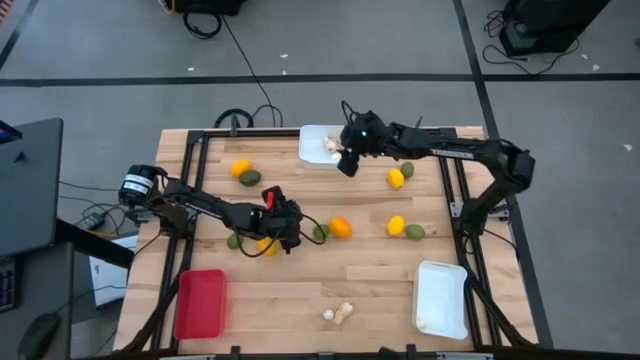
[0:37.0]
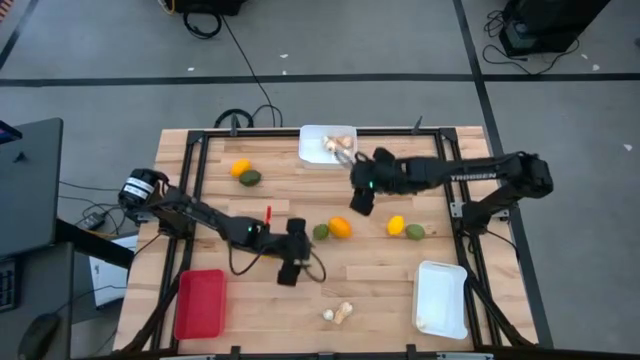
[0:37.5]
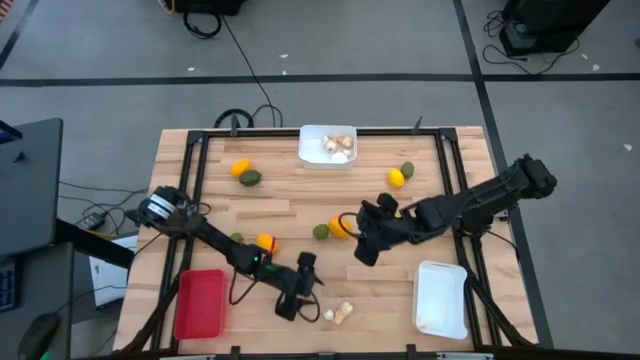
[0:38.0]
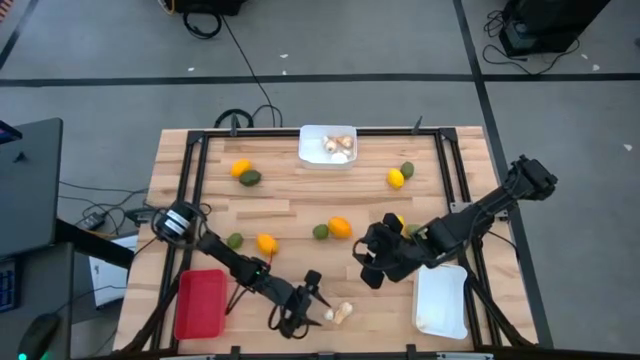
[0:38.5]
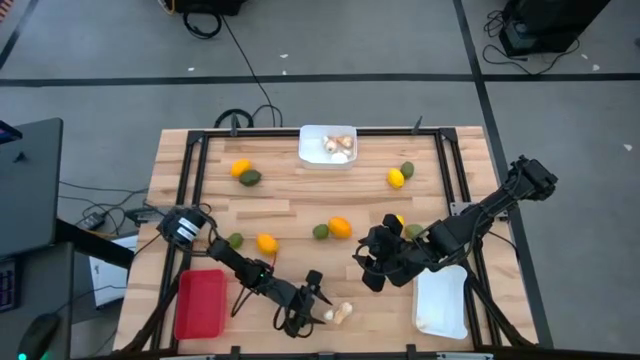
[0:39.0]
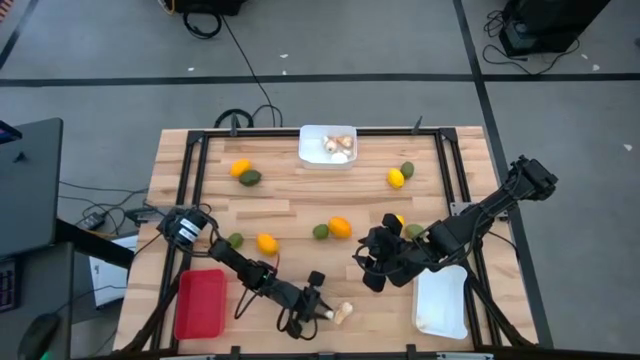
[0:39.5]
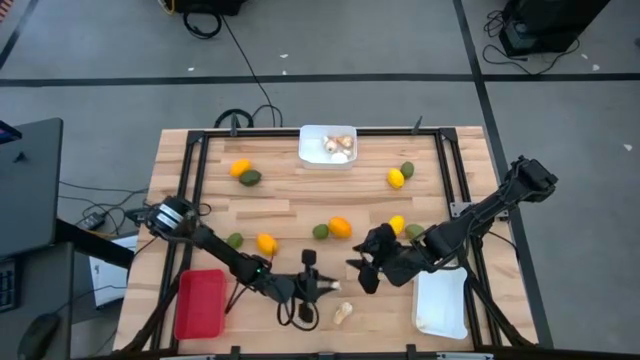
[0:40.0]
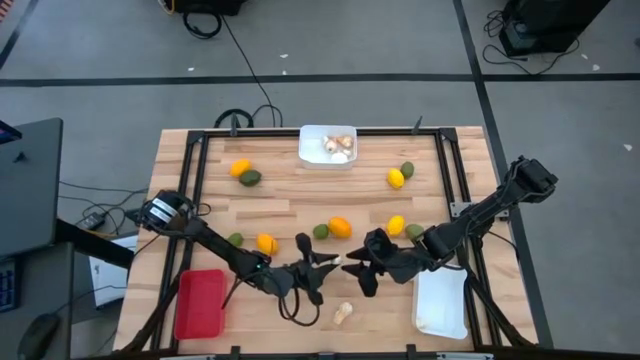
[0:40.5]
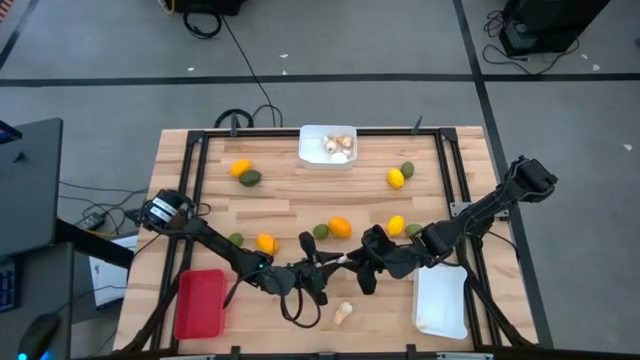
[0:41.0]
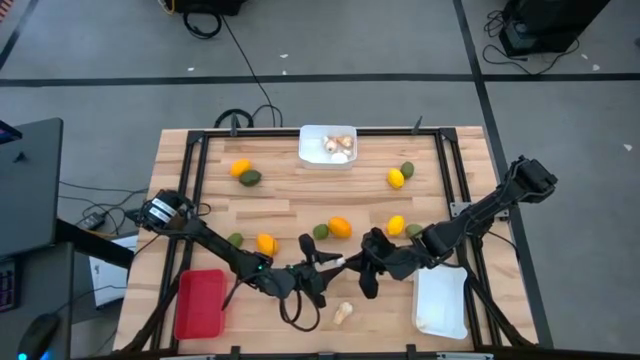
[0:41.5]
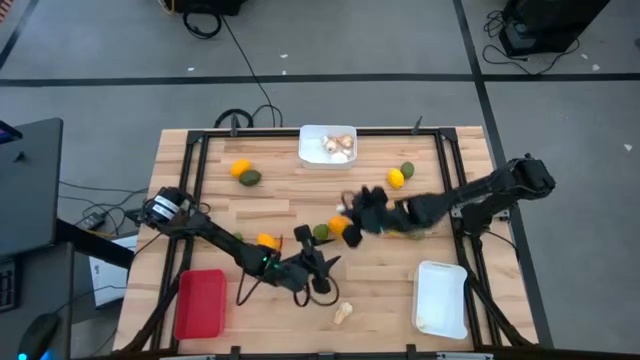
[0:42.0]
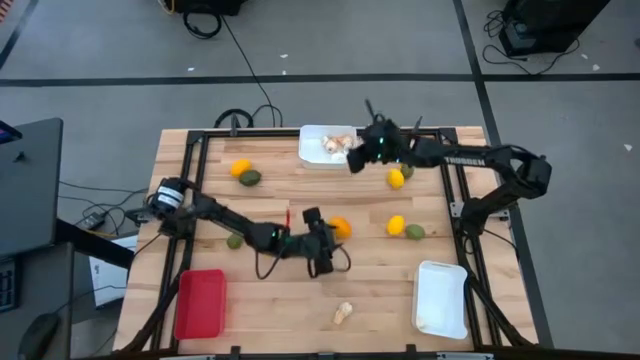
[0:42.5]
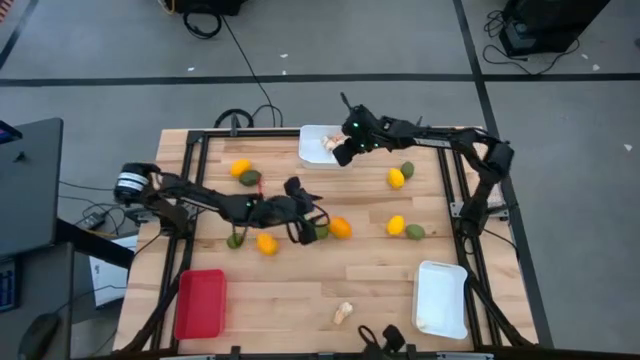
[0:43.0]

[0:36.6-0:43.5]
Task: Sort produce into baskets
Put the garlic into the top white bin

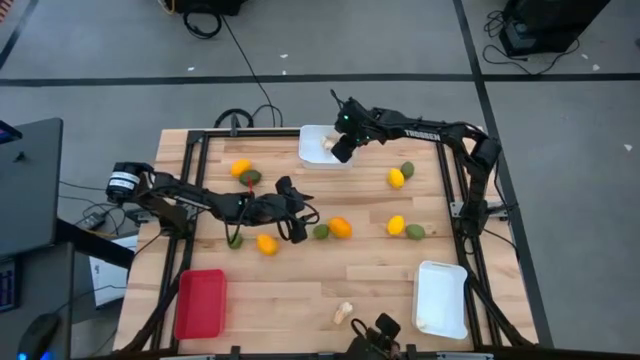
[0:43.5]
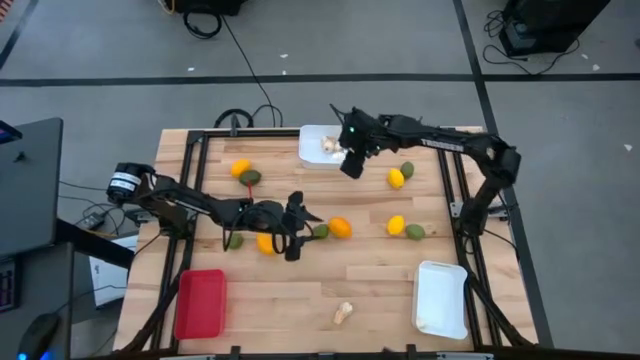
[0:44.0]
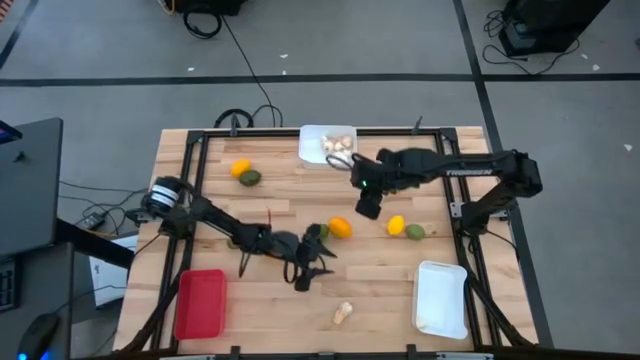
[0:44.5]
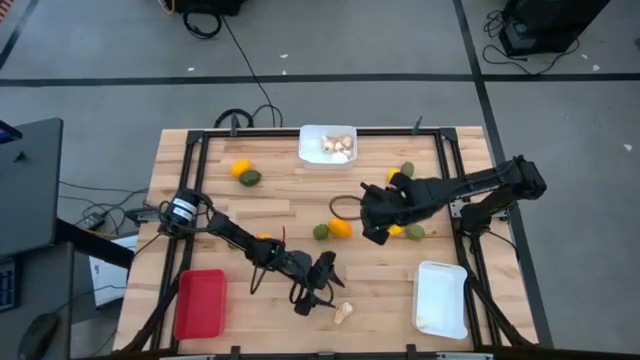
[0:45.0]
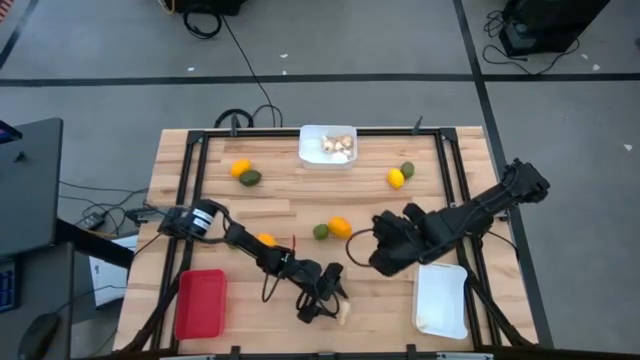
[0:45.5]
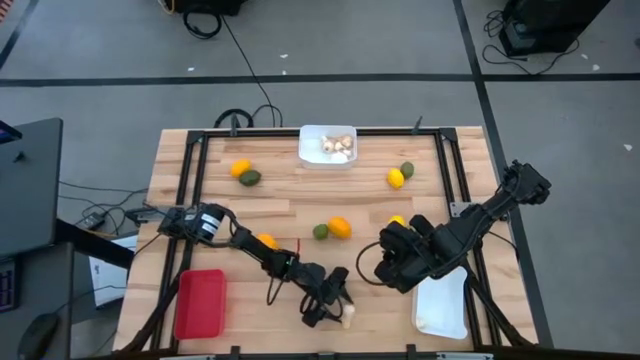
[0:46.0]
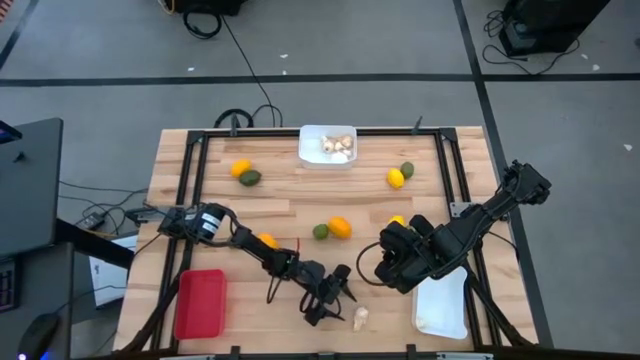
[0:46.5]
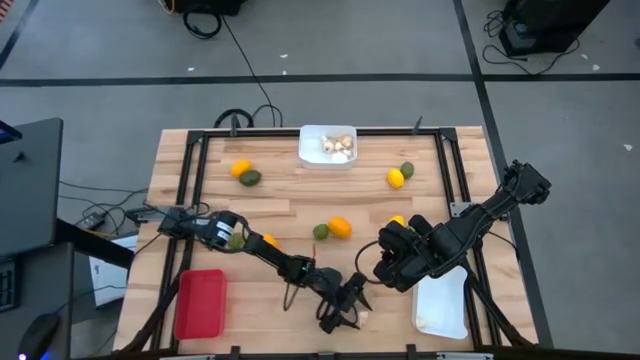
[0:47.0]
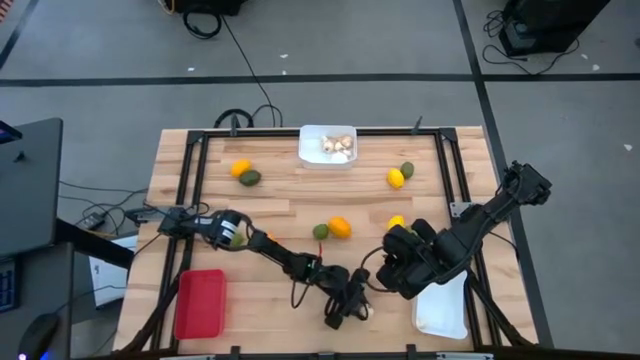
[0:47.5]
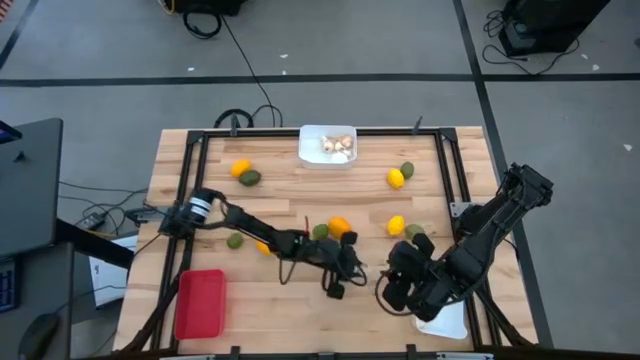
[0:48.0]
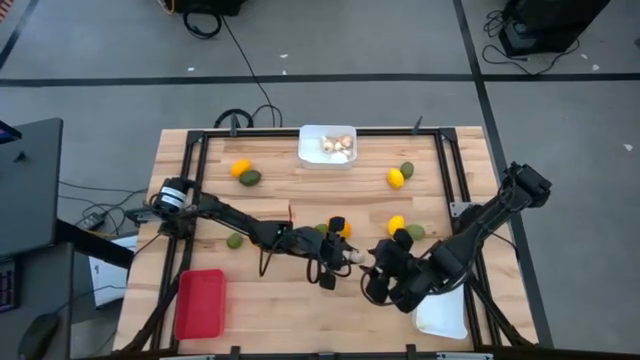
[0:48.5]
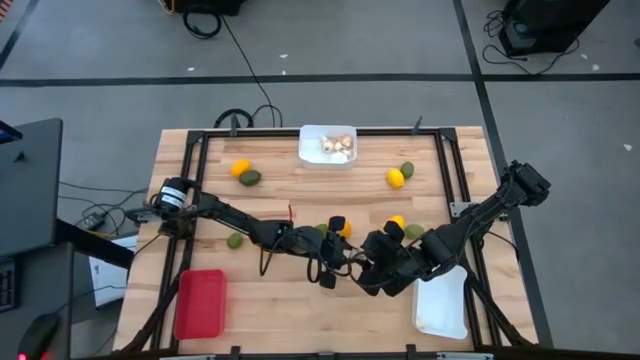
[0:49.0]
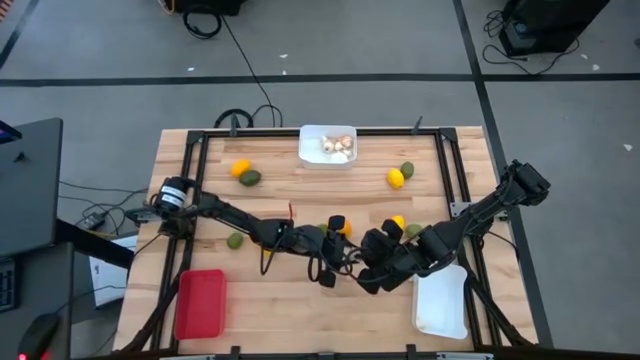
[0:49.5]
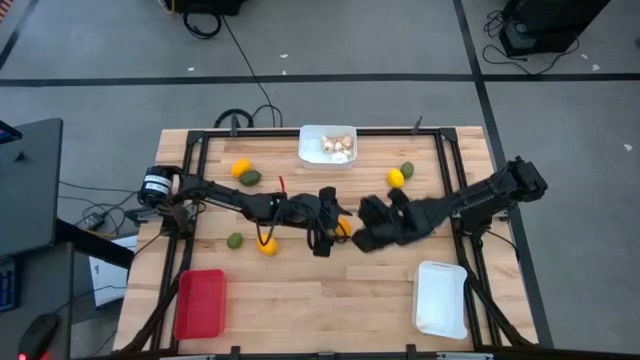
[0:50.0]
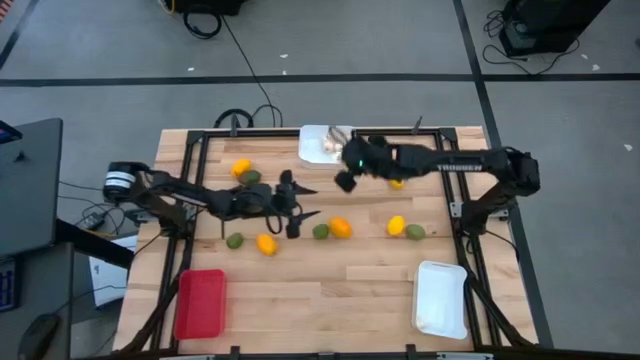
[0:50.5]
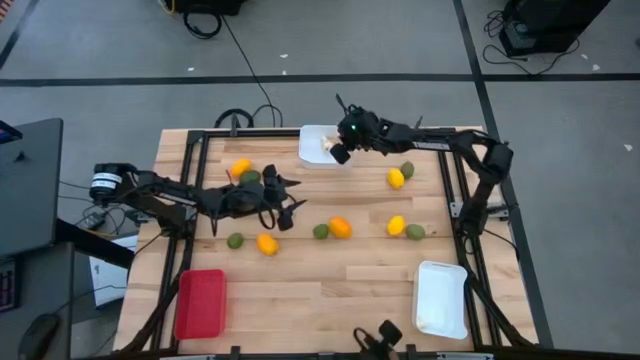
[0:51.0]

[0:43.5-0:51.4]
Put the garlic into the top white bin

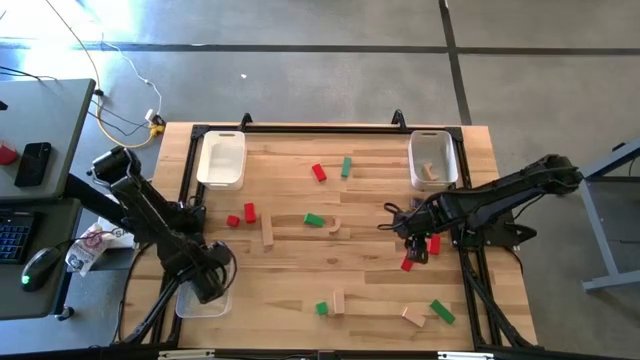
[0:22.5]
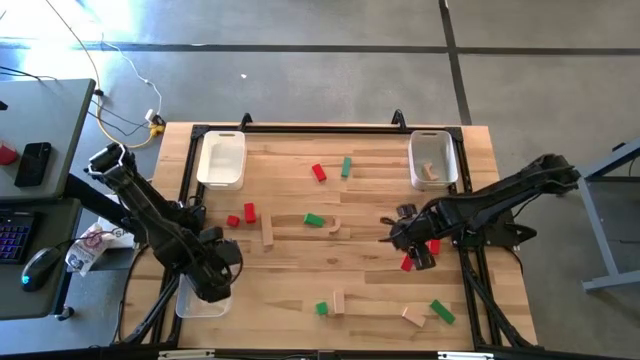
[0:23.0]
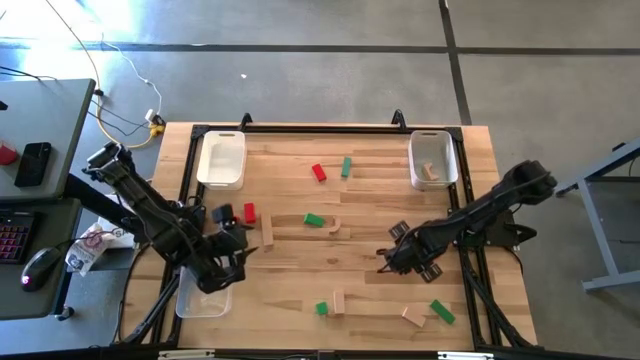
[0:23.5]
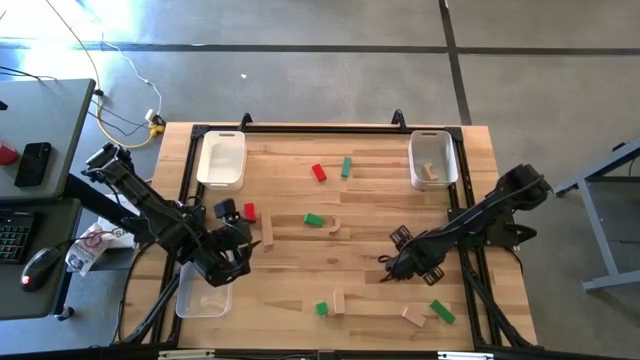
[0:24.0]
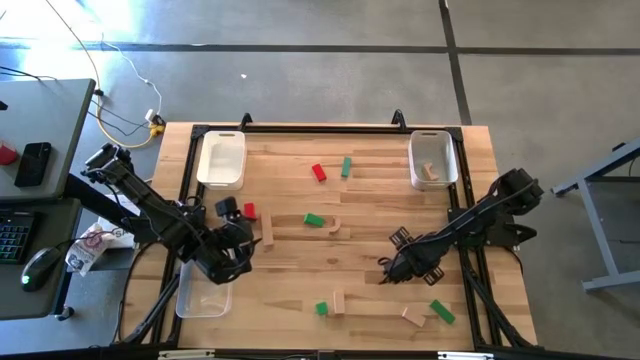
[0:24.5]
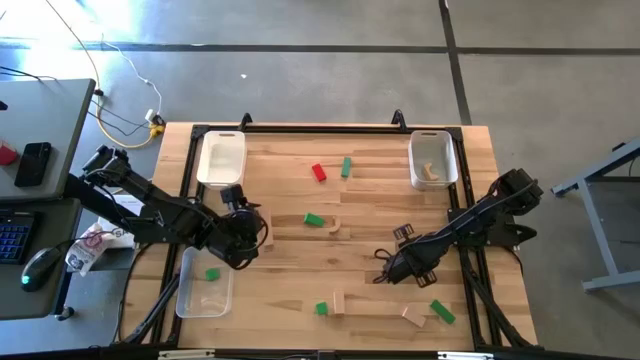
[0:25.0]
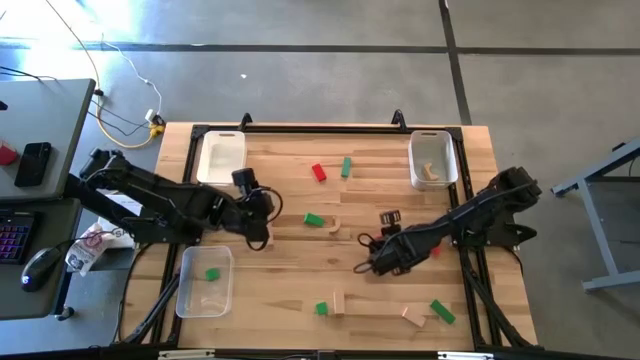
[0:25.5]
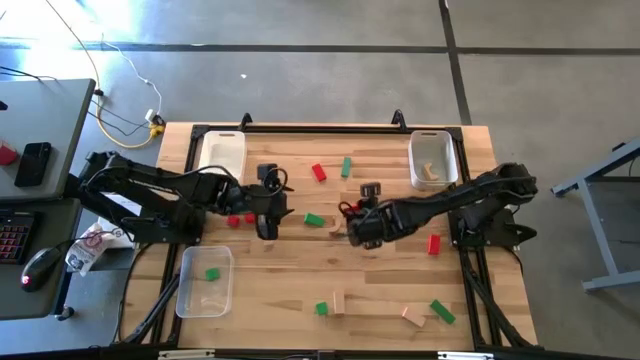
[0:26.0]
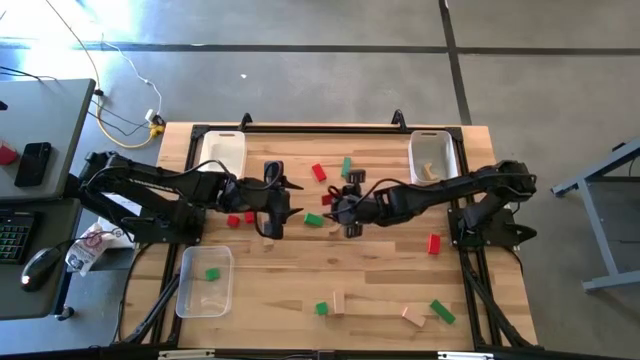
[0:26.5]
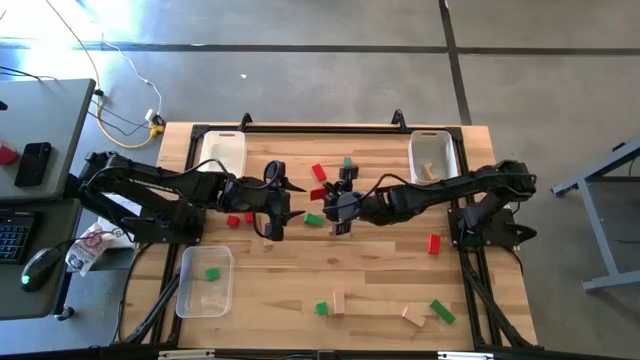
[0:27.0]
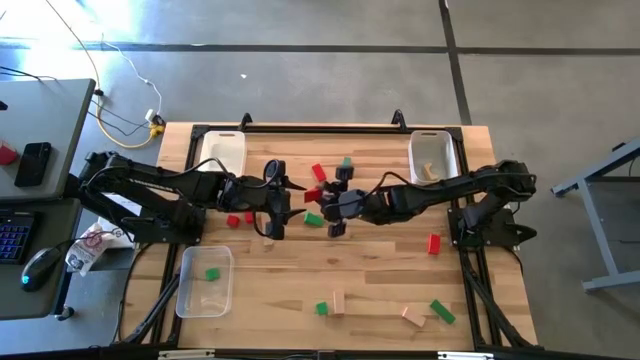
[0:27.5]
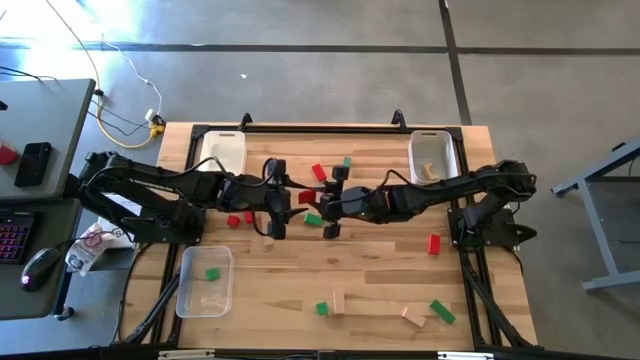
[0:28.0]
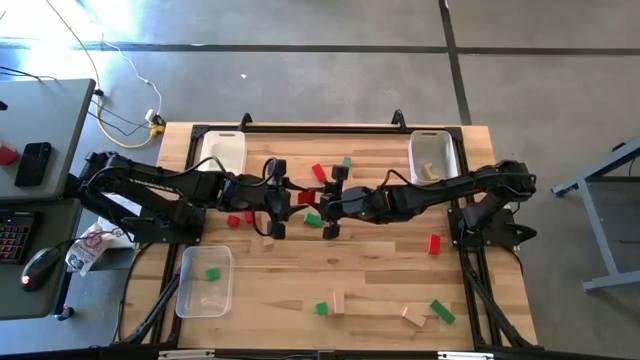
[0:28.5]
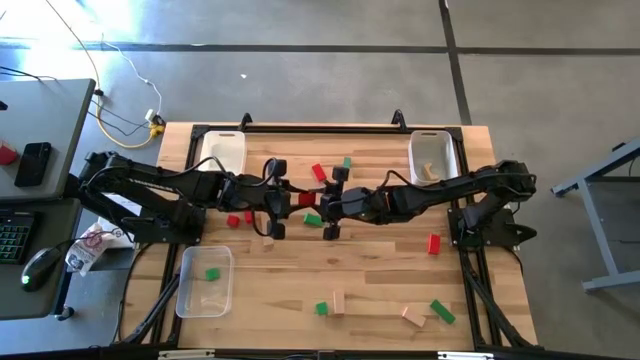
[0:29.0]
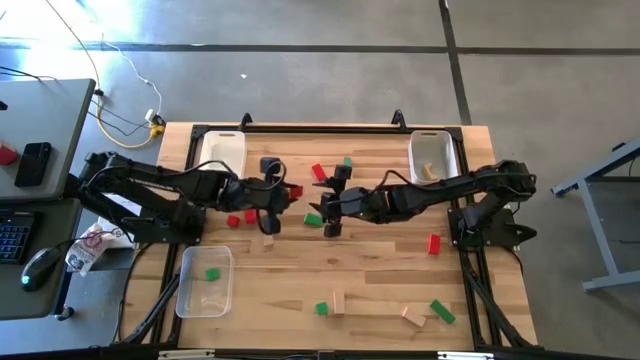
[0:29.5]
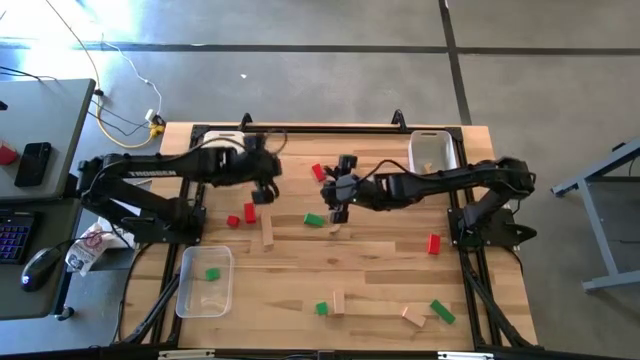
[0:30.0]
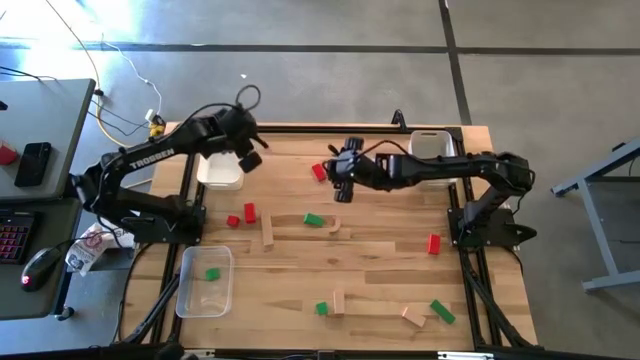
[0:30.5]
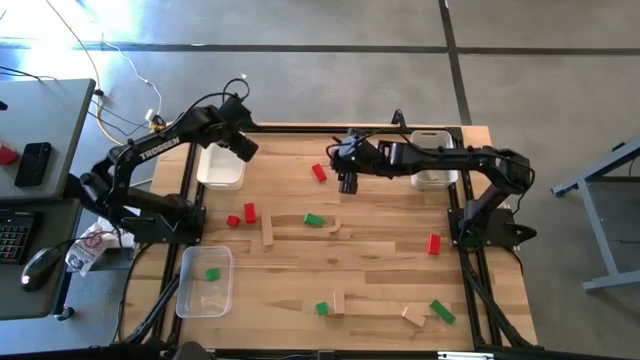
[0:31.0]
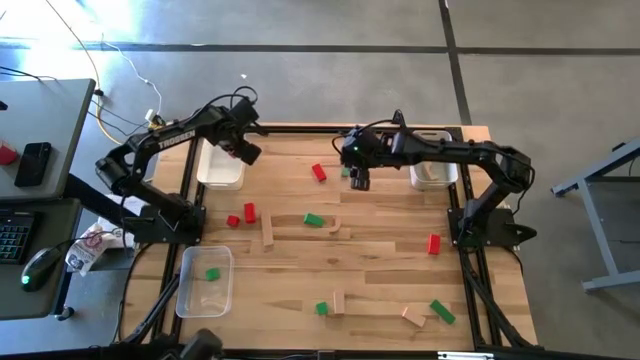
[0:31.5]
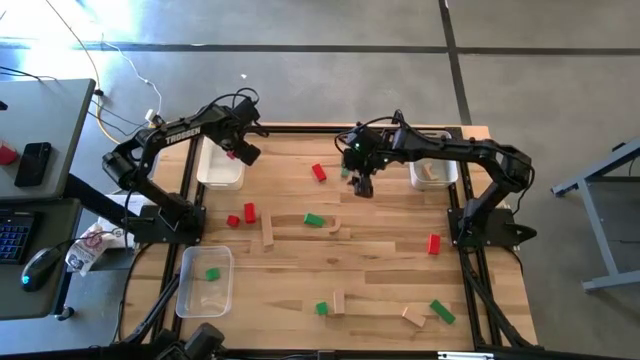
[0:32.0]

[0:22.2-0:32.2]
Task: Sort & place blocks by color
Put the red block into the white bin
